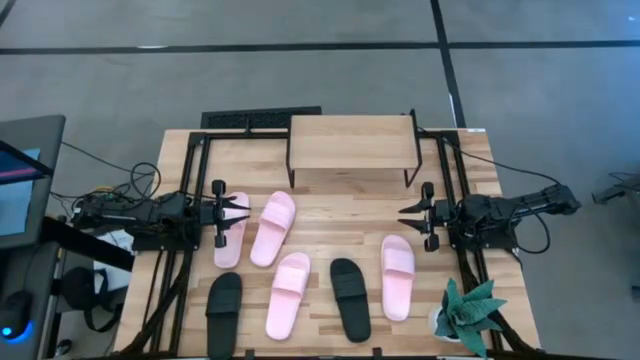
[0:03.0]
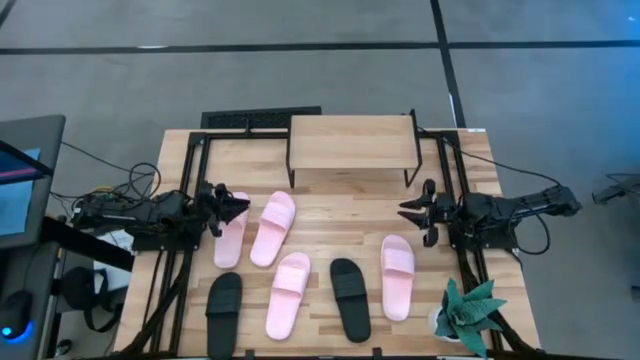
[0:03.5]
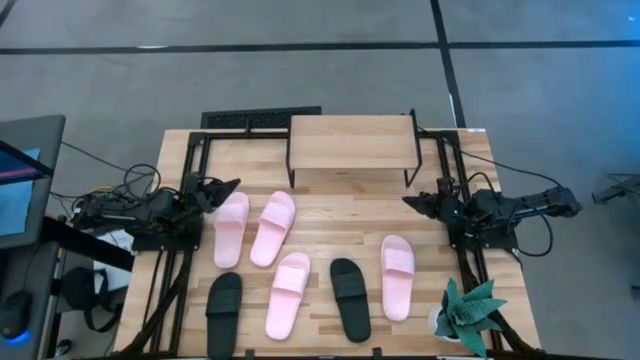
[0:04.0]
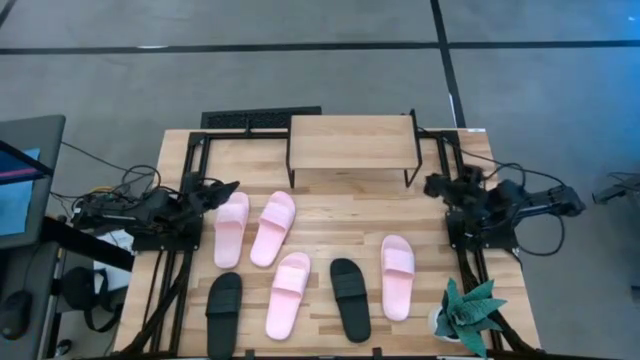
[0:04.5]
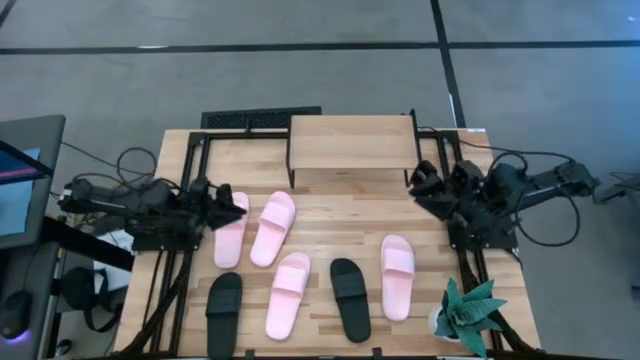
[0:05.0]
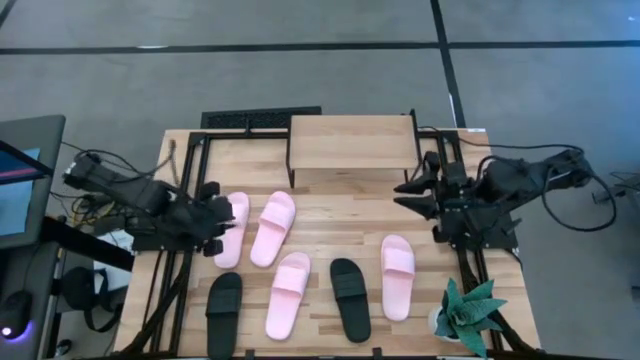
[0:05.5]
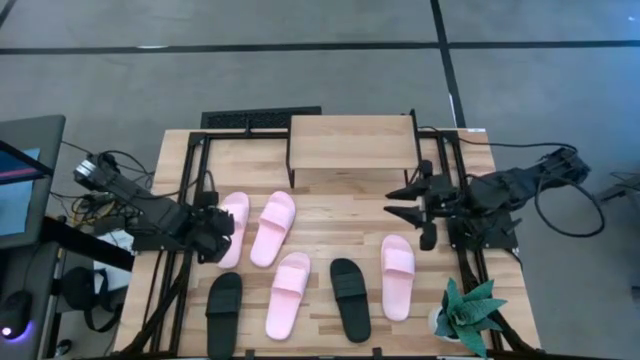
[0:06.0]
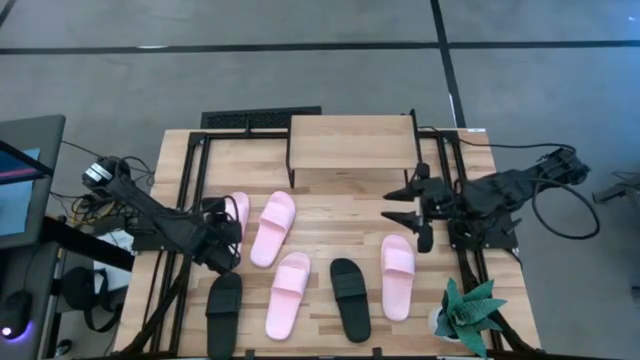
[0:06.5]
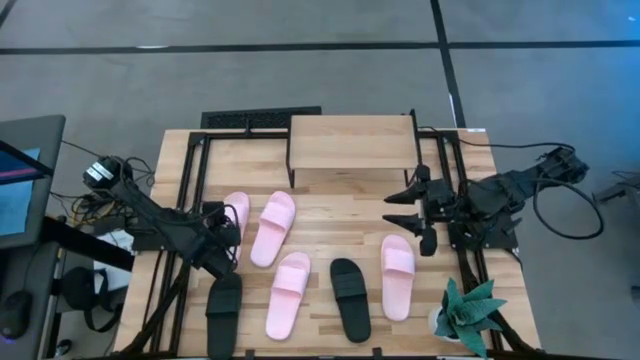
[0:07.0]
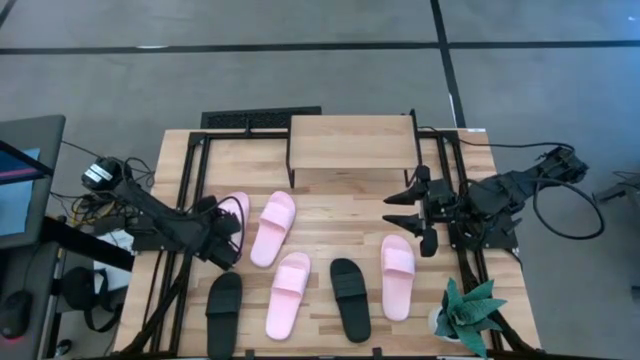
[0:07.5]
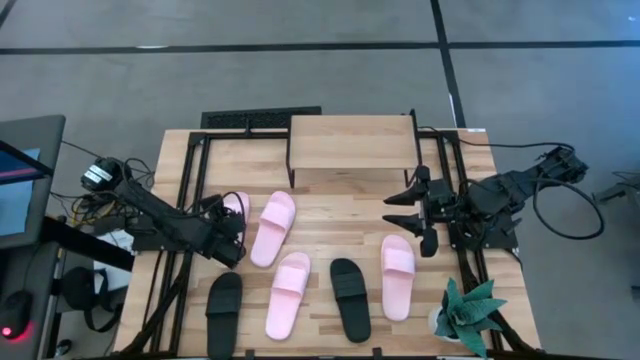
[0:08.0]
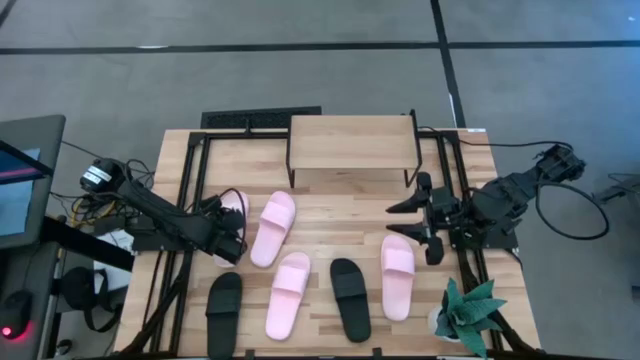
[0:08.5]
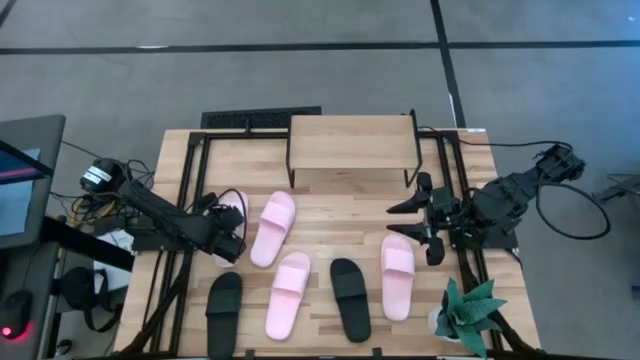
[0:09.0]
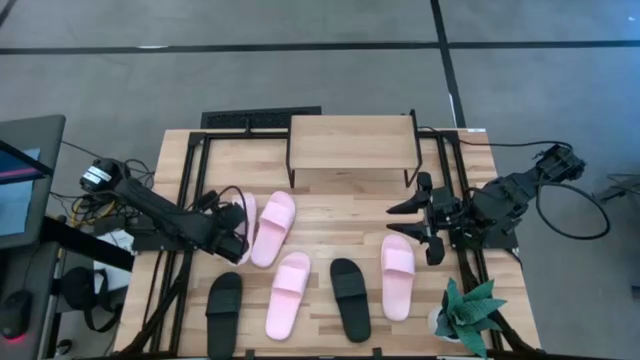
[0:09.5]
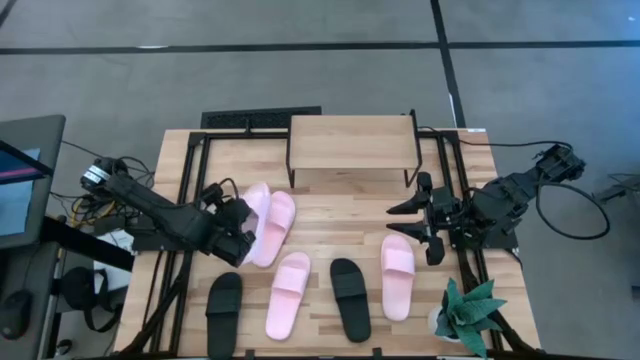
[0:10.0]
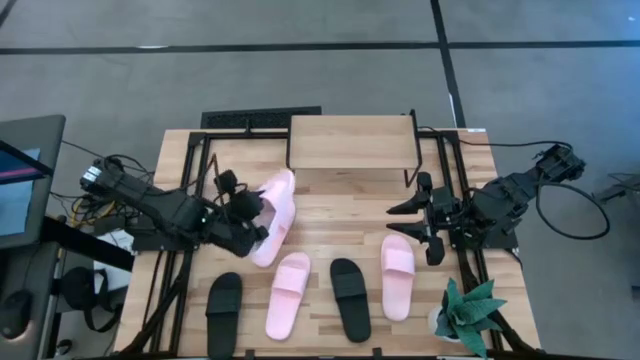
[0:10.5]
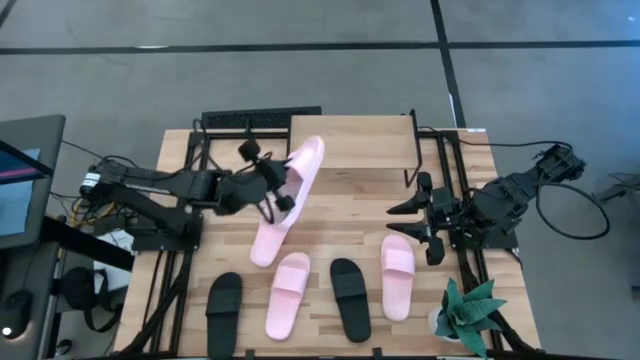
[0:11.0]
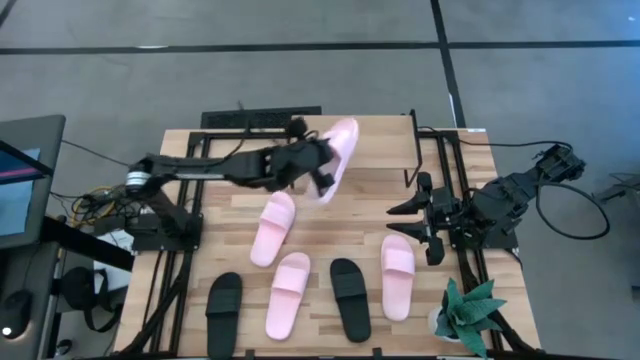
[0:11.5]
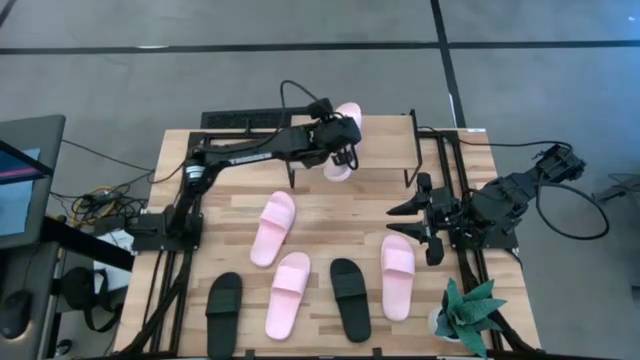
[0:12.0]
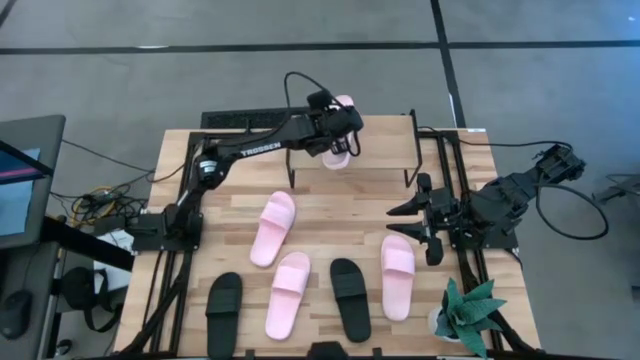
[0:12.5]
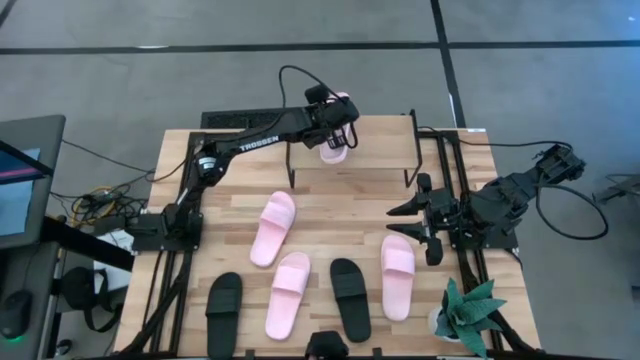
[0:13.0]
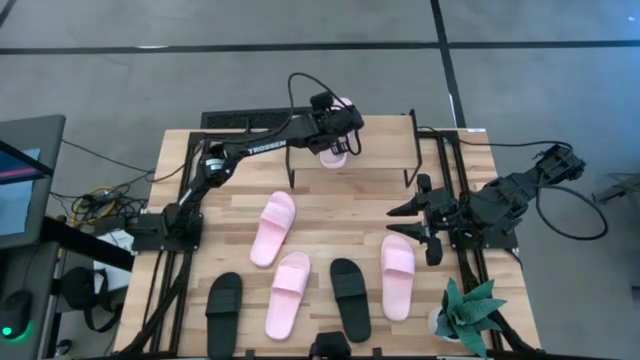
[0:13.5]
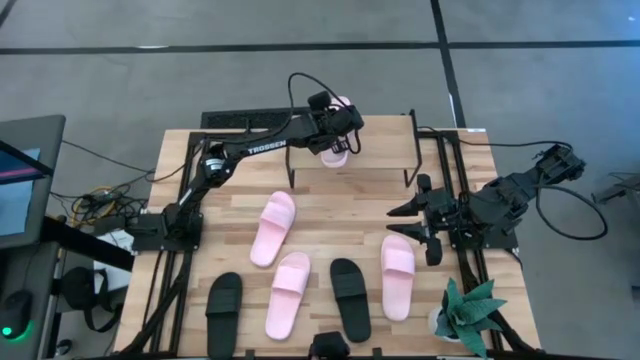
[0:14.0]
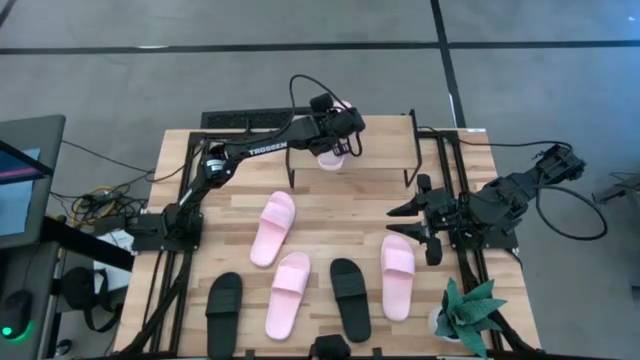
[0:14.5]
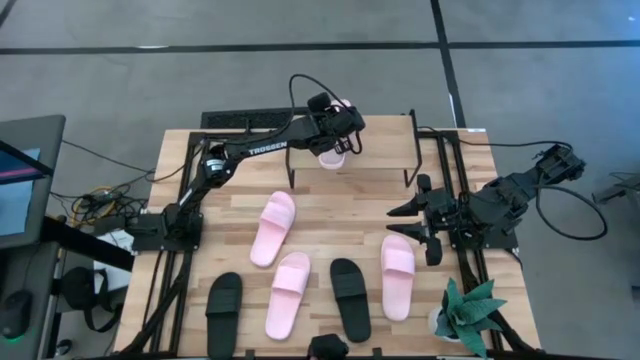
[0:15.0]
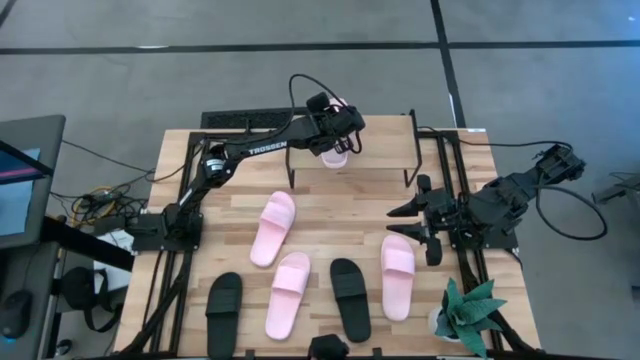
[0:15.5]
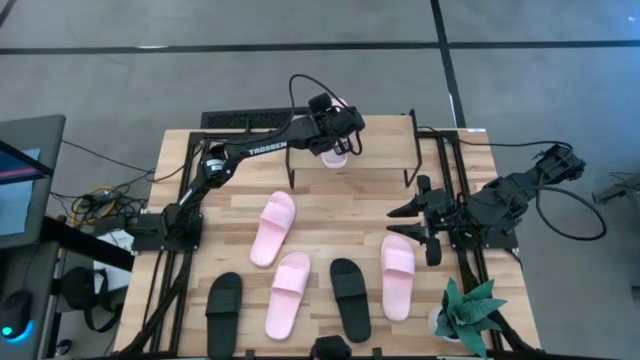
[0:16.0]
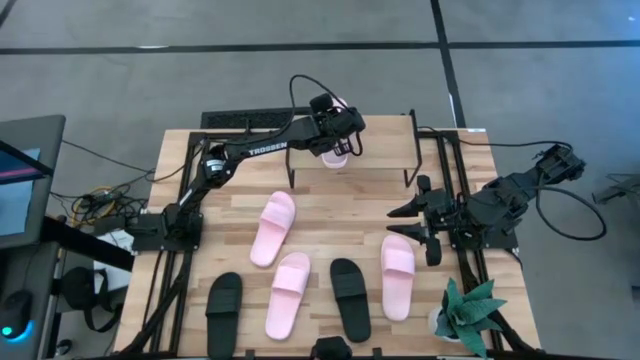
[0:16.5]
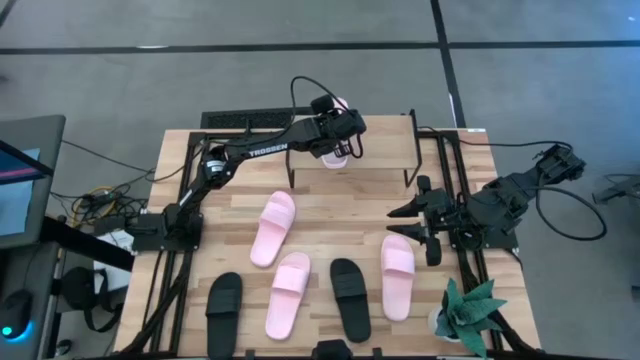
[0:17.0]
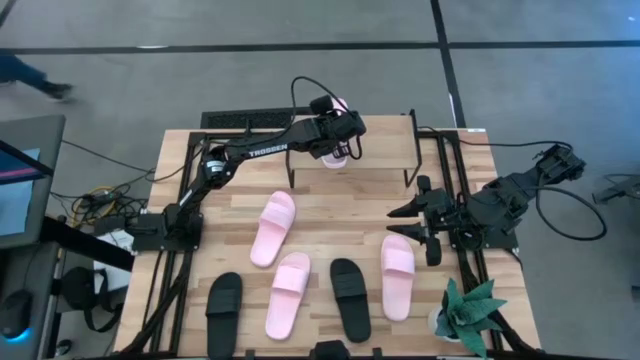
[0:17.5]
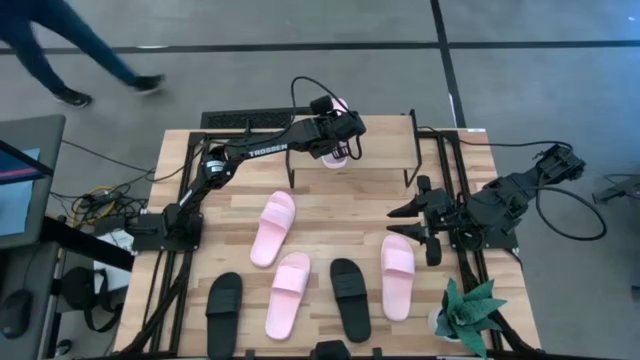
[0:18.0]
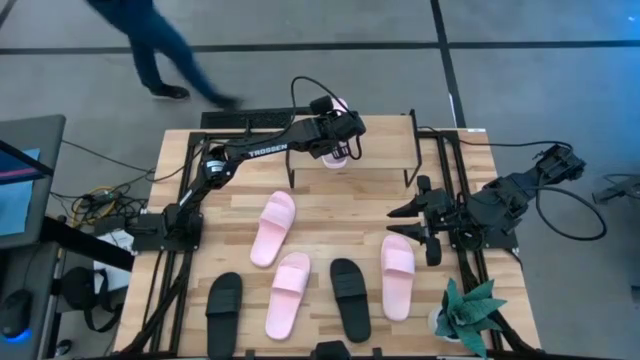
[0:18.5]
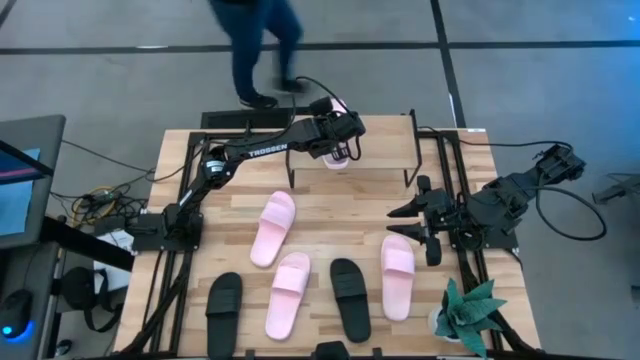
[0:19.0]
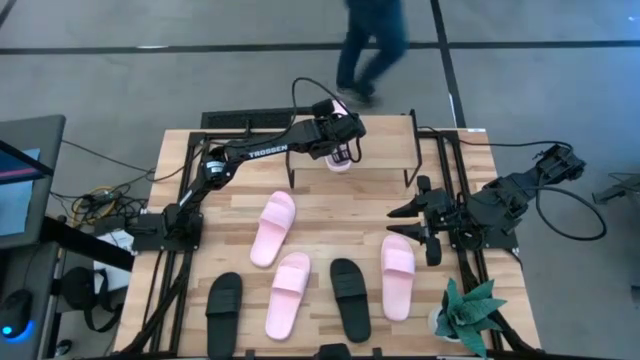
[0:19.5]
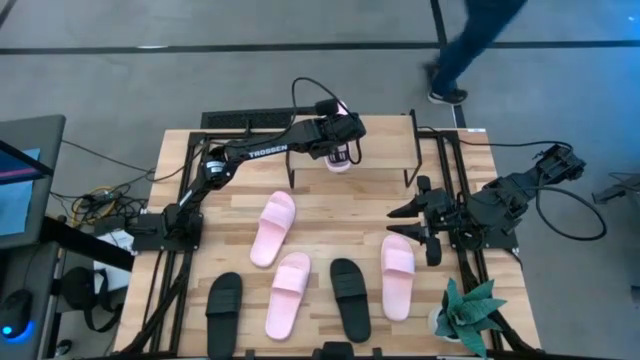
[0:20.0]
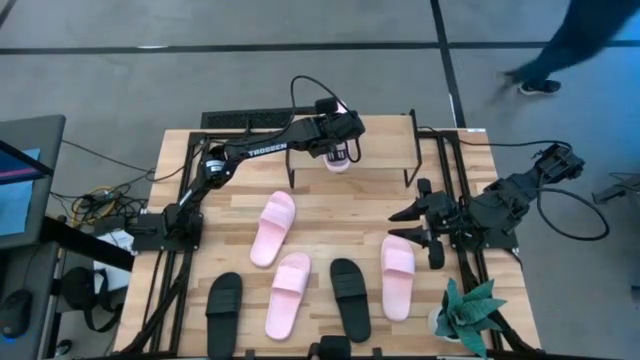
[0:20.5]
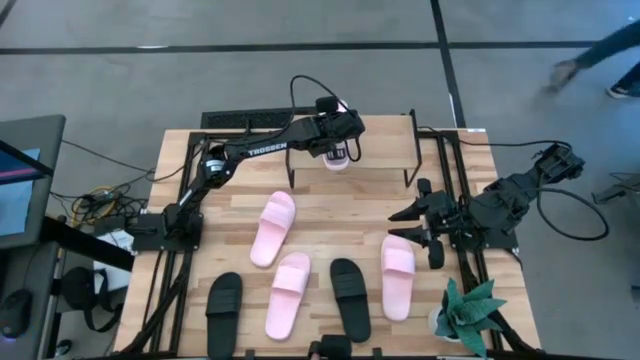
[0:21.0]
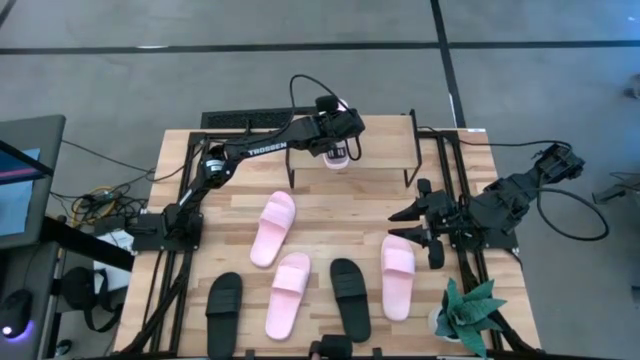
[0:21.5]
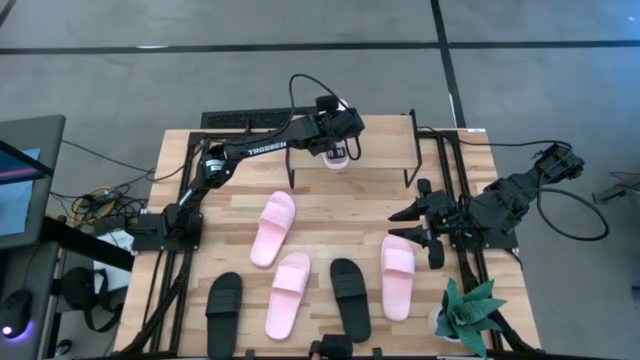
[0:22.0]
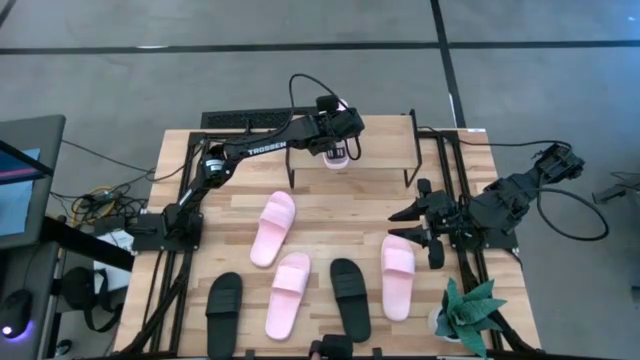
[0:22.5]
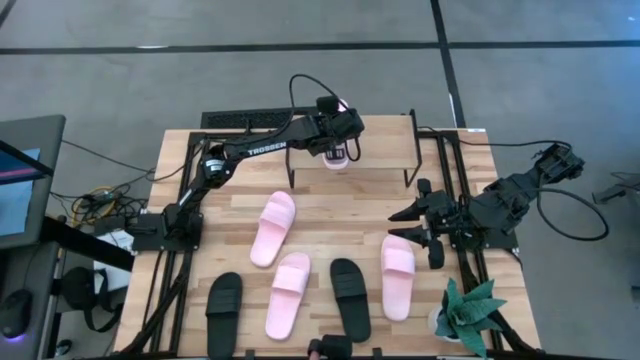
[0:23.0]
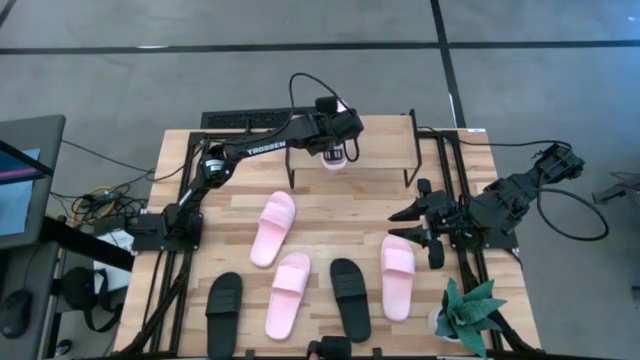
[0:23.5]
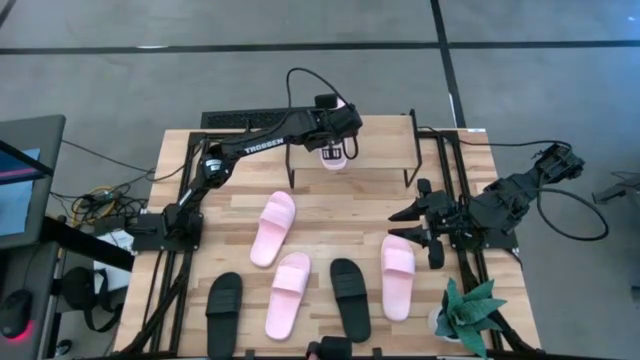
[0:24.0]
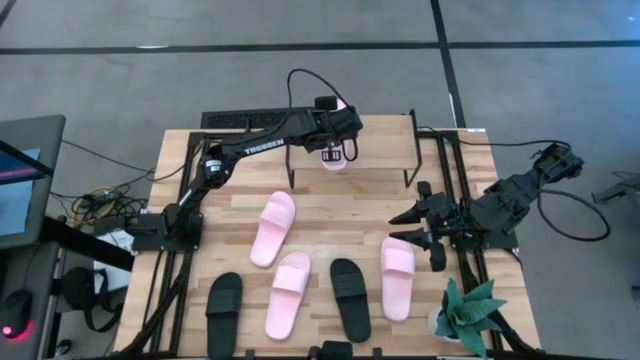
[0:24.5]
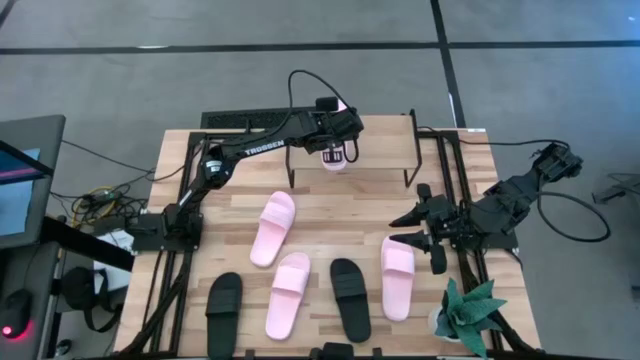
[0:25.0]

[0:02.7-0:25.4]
Task: Pick and place slides into the shelf
Put the pink slide on the shelf
